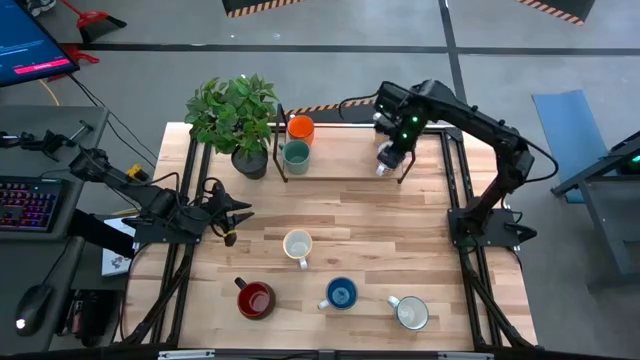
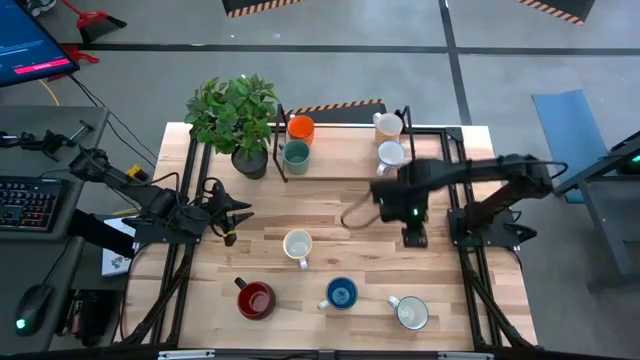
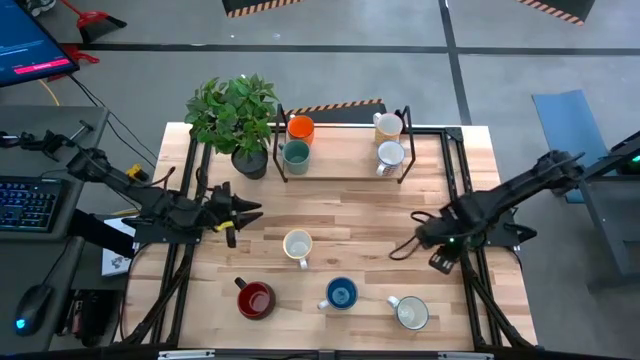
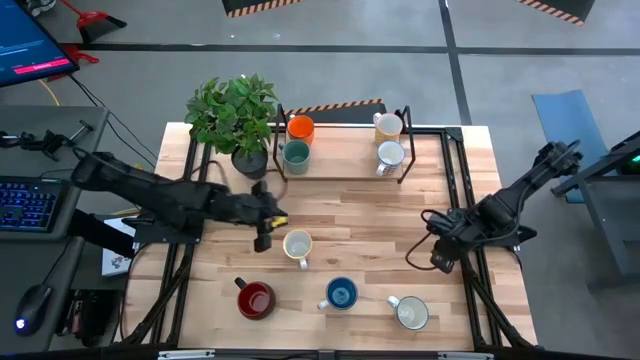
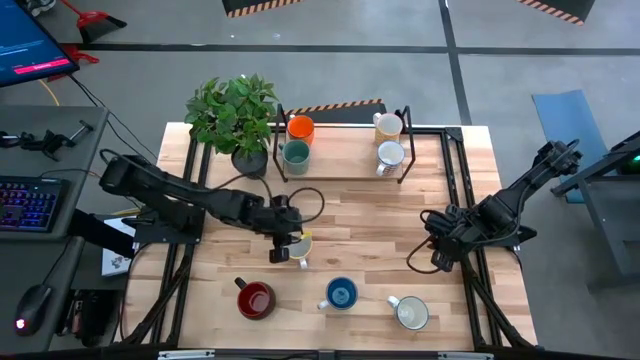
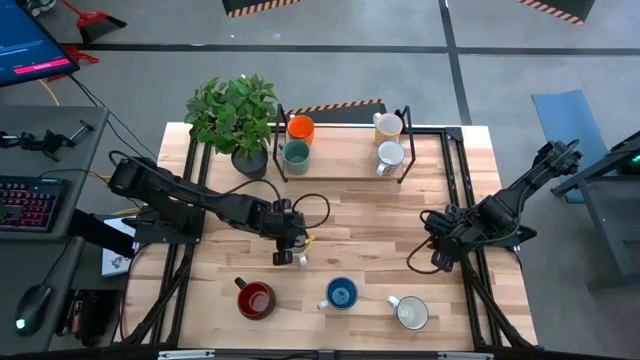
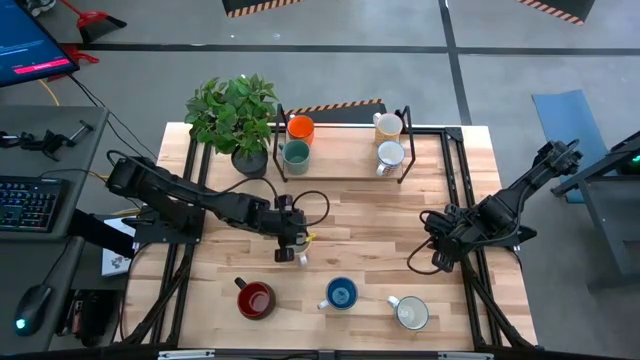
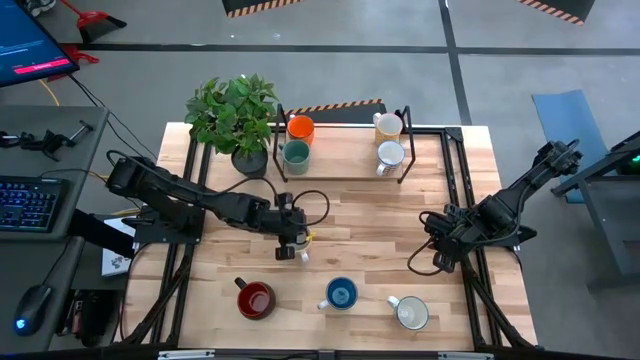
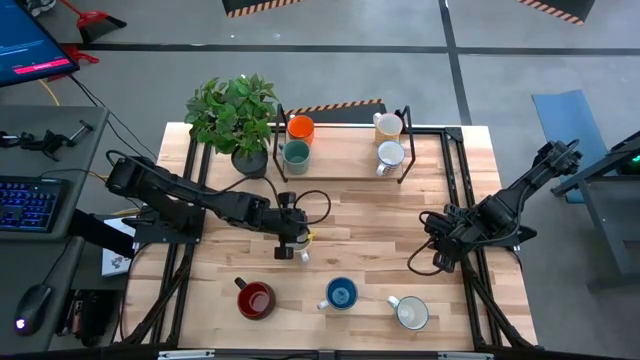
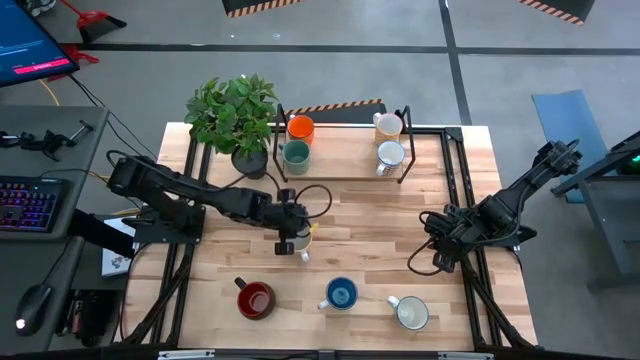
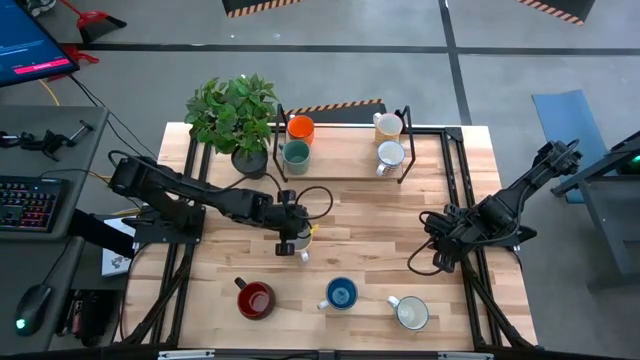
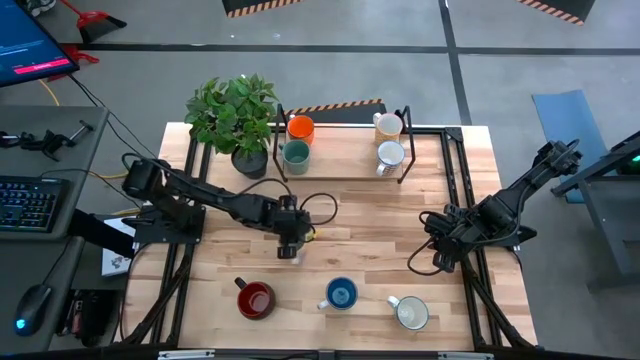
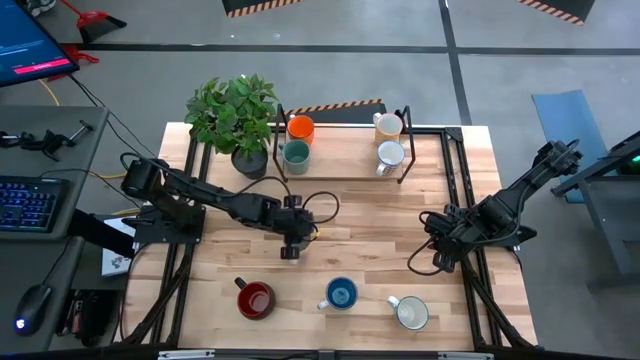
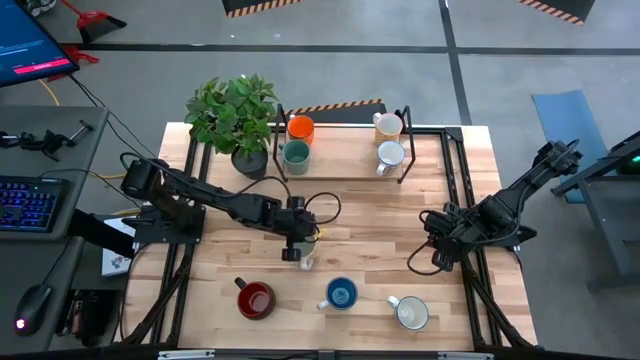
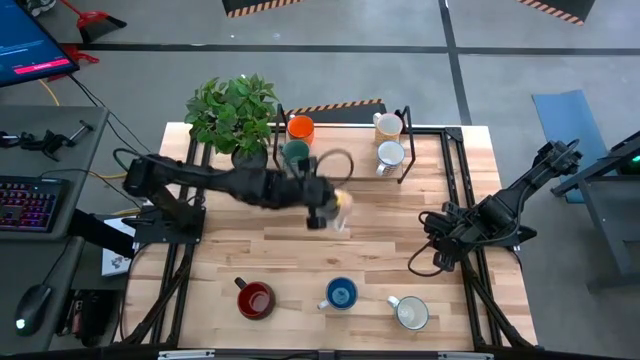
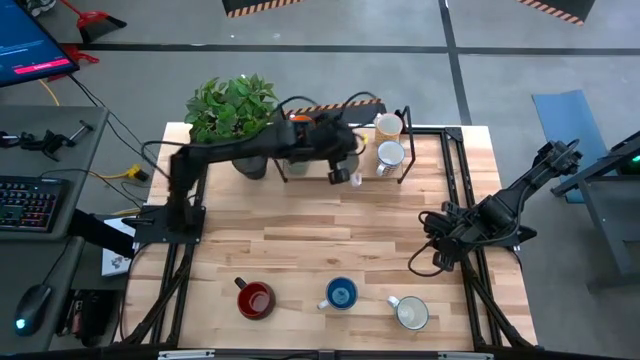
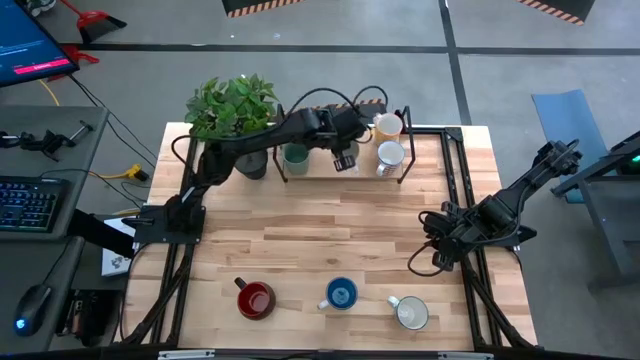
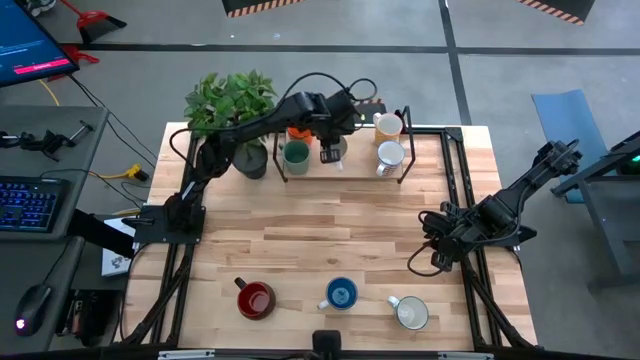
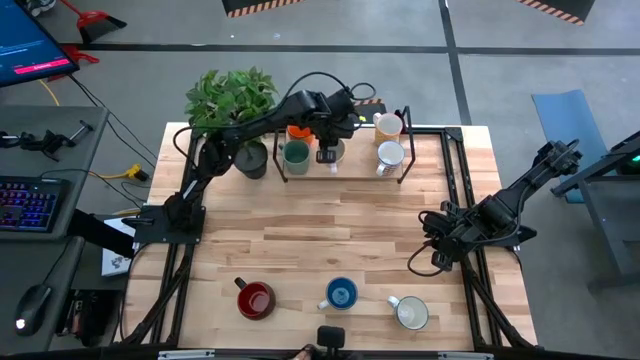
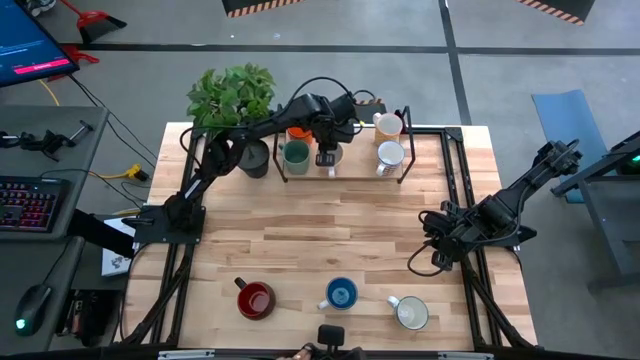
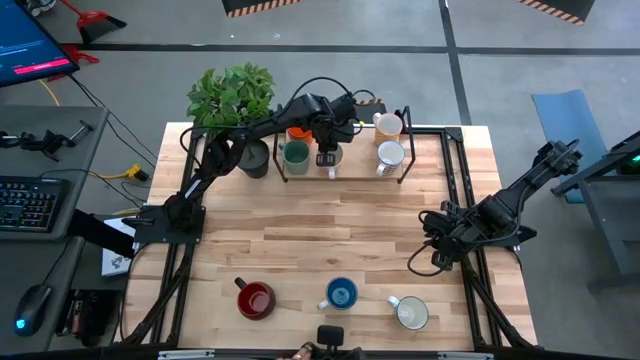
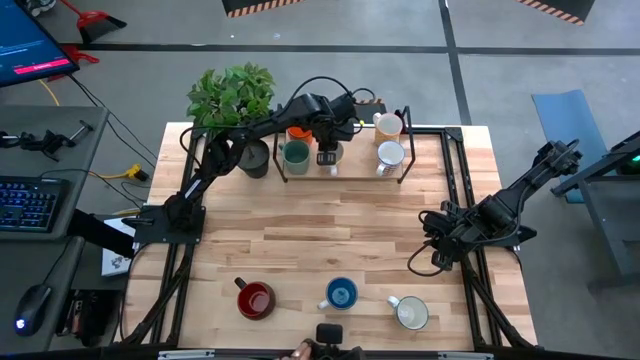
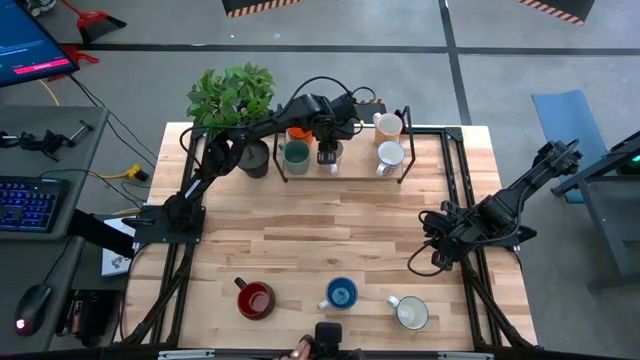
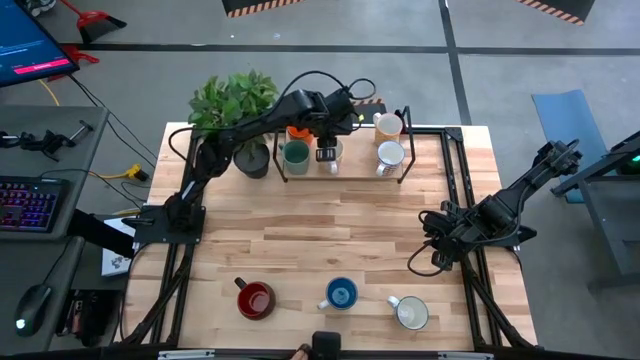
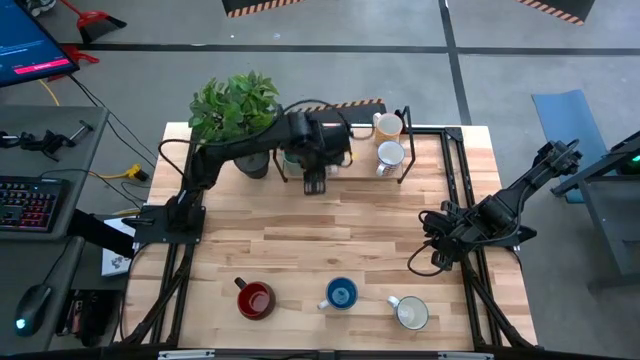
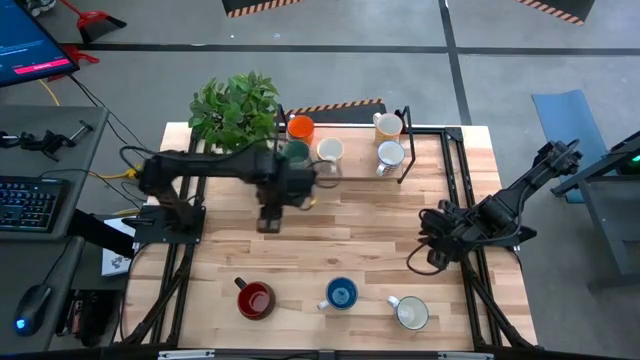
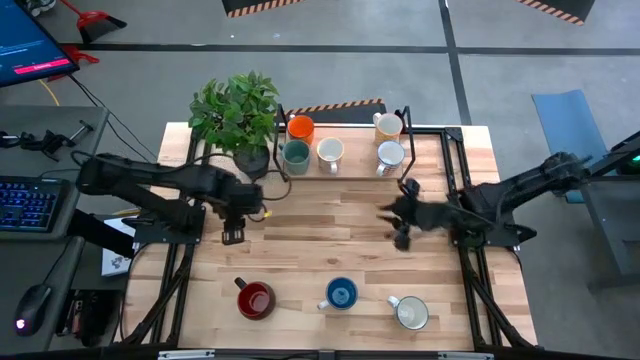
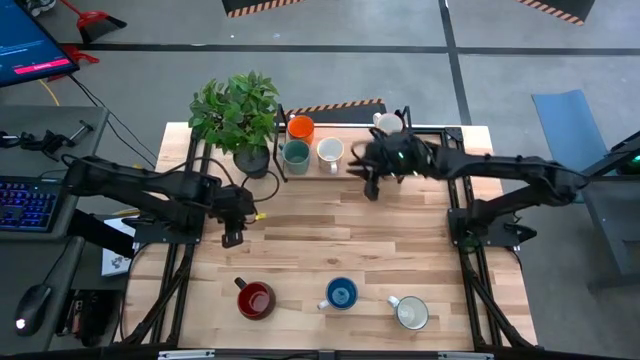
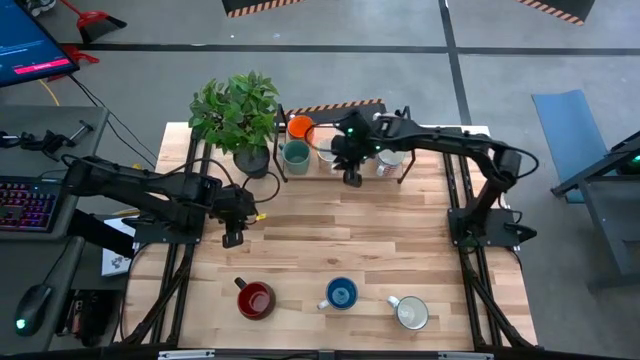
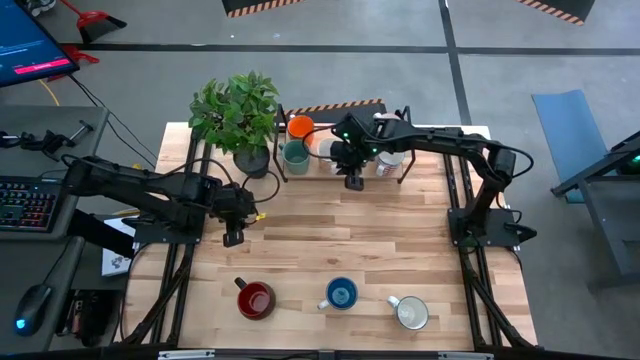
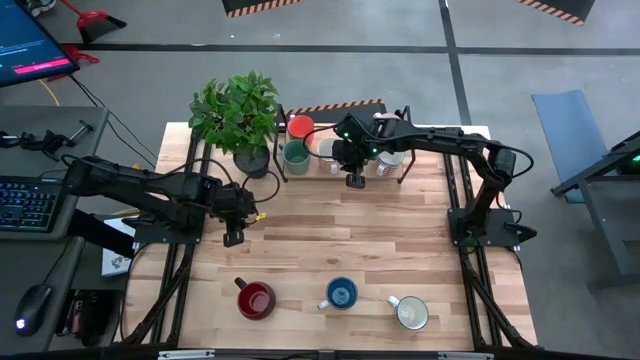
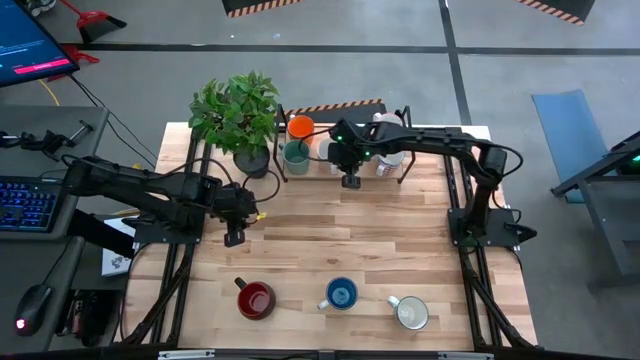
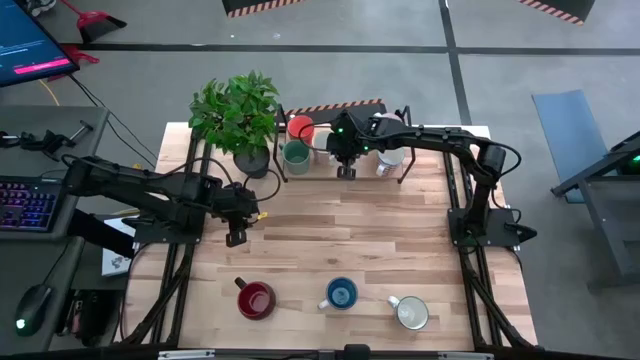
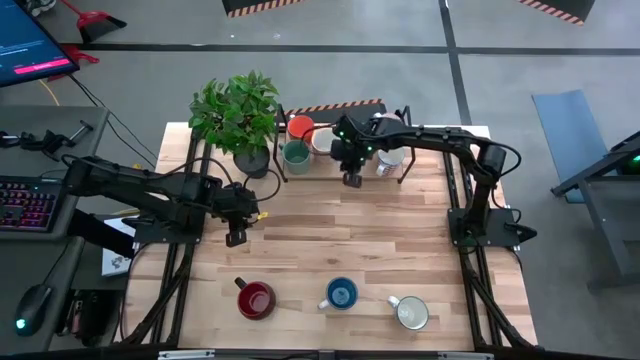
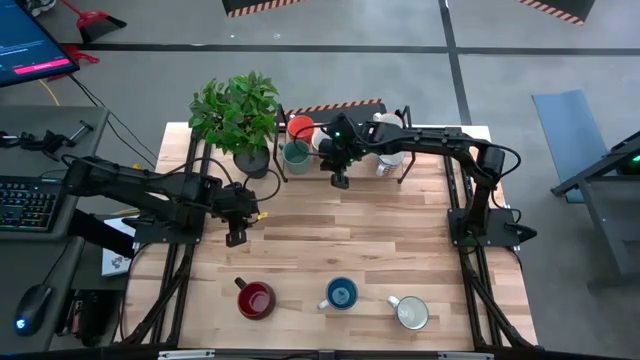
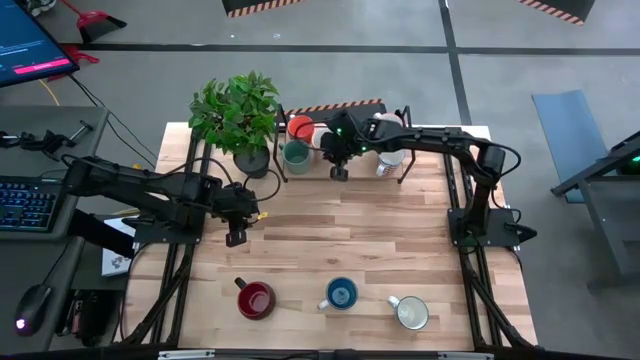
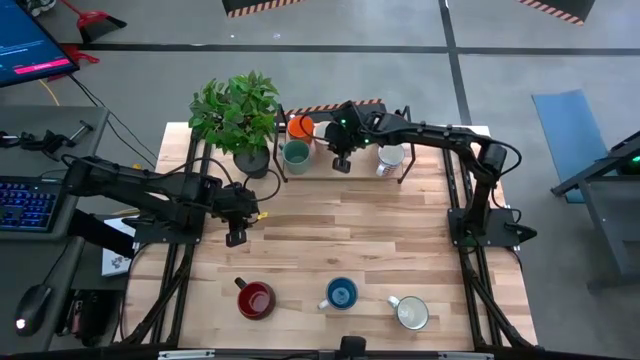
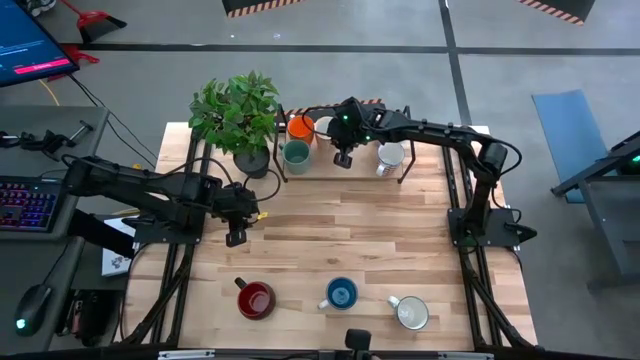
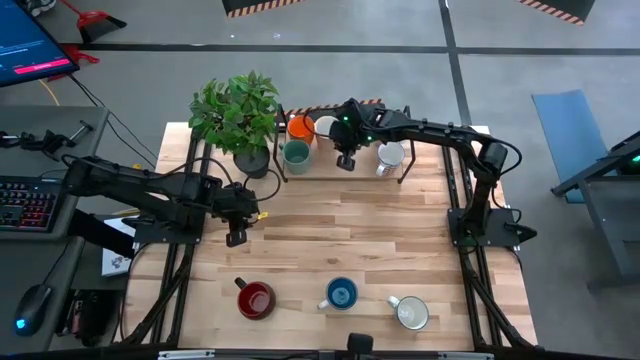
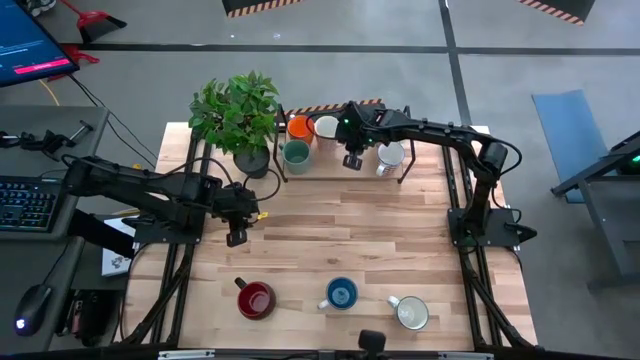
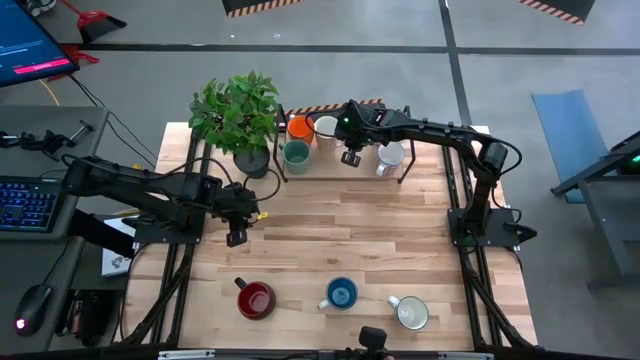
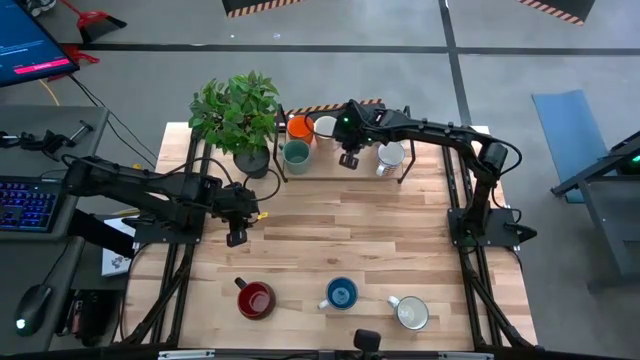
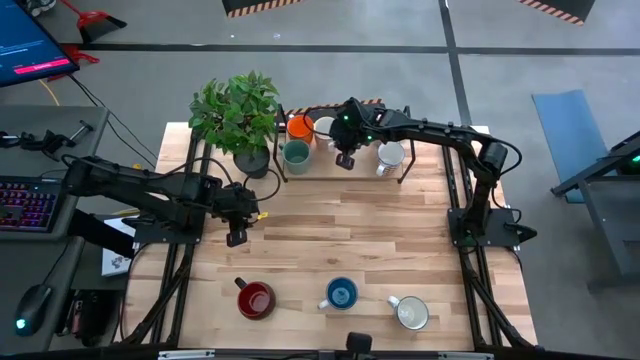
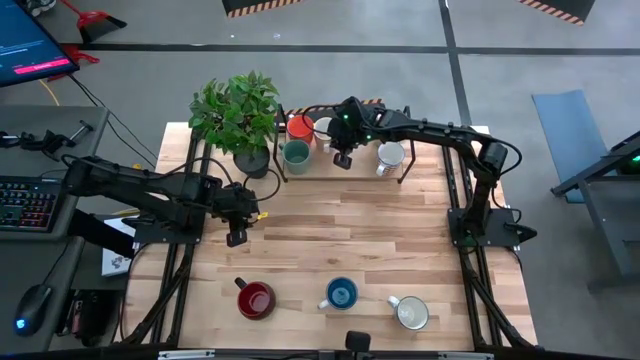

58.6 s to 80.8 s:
Task: Place coffee mugs
Put the patterned orange mug on the shelf

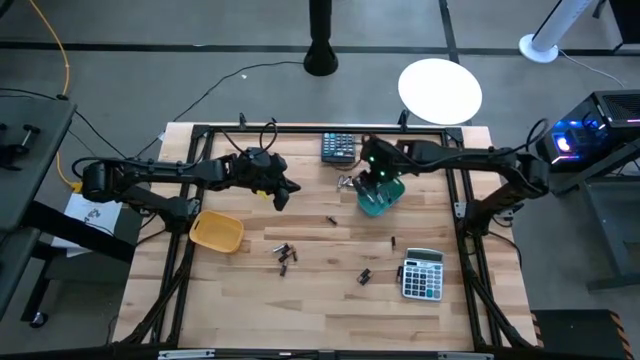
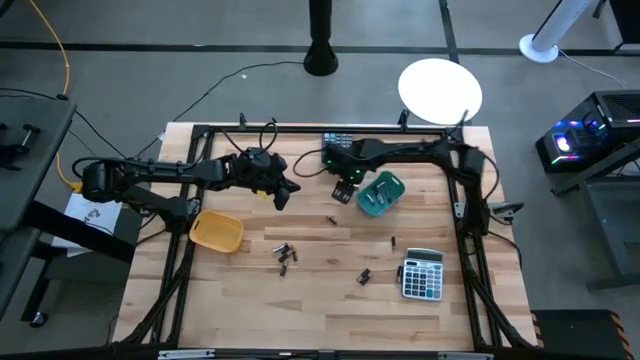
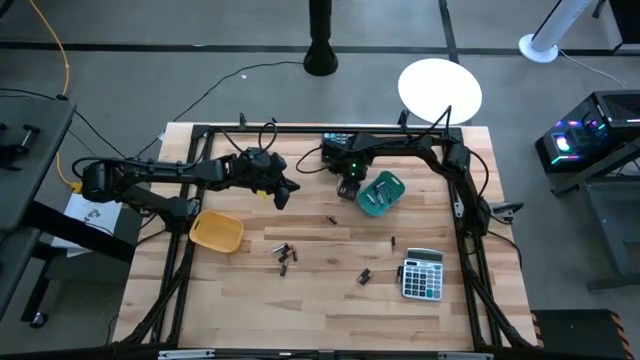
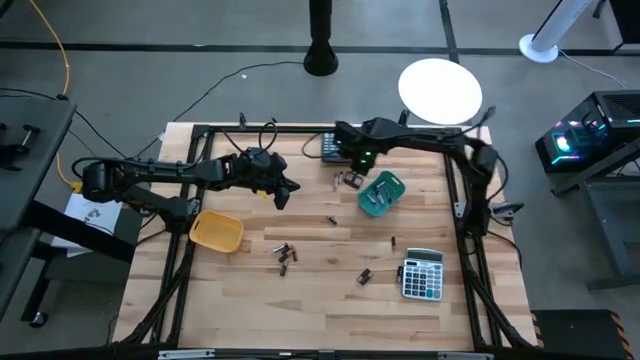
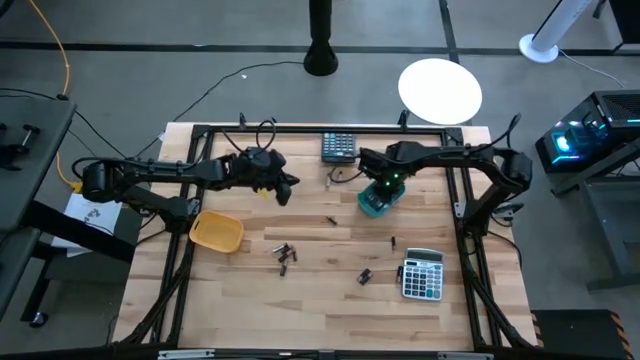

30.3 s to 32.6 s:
Task: Sort batteries
Put the silver battery into the green bin
